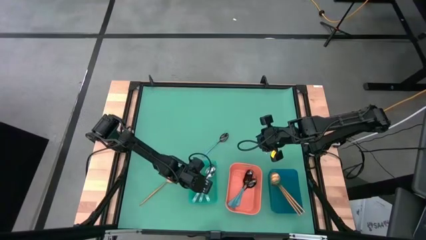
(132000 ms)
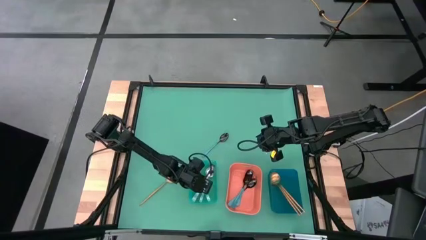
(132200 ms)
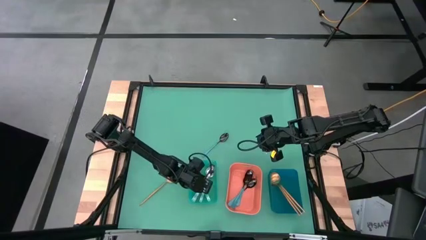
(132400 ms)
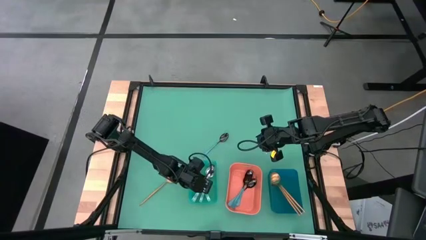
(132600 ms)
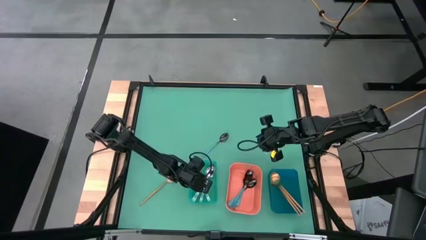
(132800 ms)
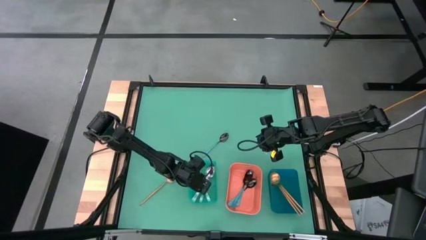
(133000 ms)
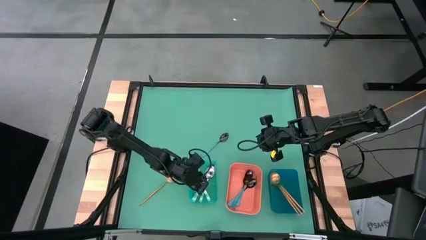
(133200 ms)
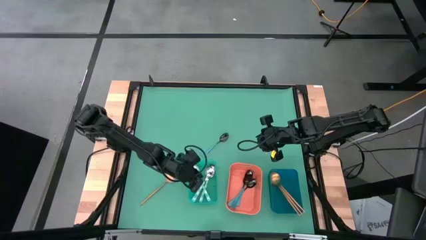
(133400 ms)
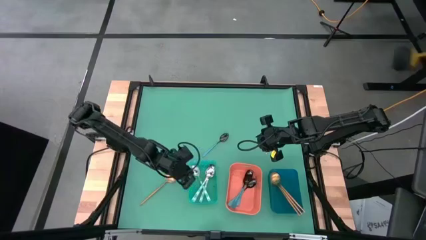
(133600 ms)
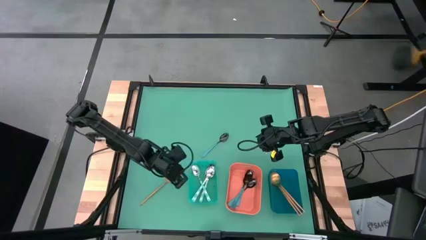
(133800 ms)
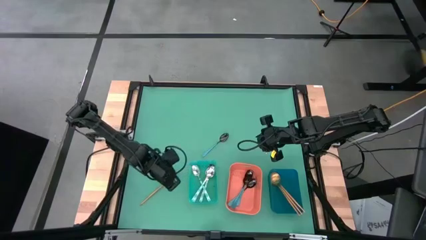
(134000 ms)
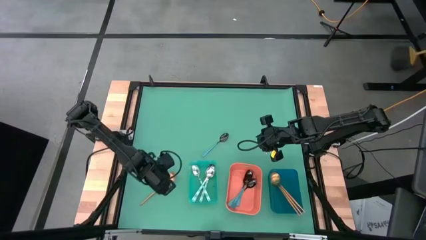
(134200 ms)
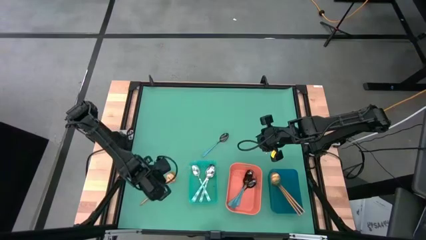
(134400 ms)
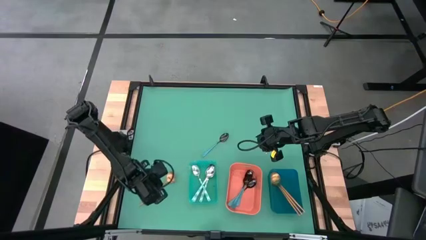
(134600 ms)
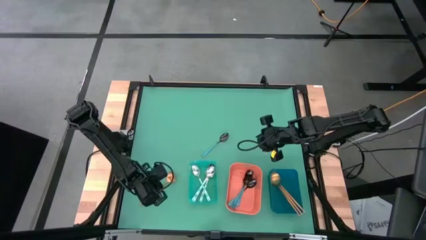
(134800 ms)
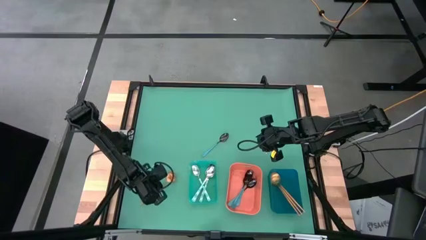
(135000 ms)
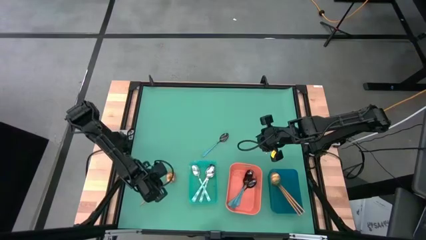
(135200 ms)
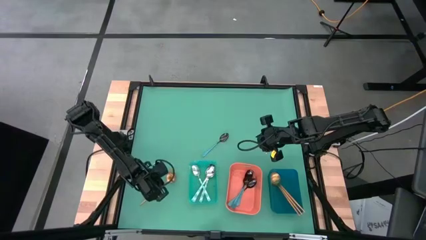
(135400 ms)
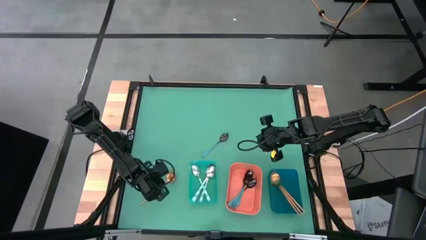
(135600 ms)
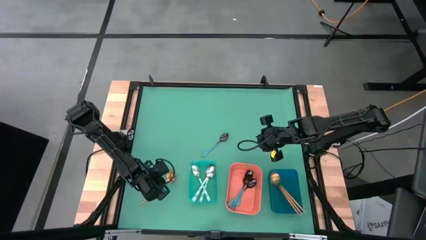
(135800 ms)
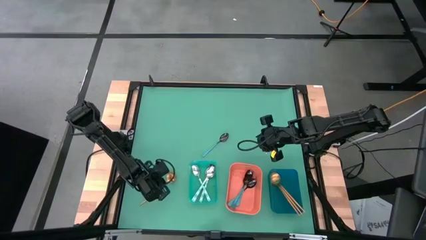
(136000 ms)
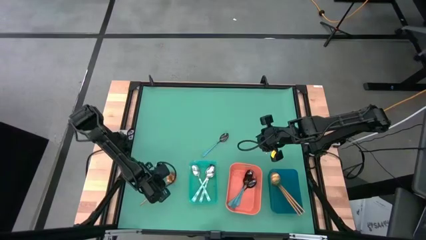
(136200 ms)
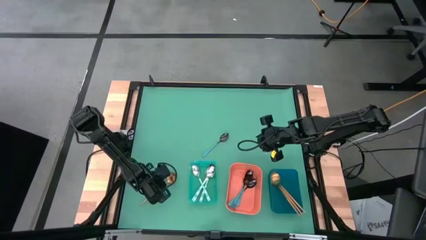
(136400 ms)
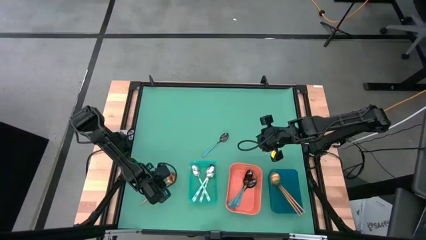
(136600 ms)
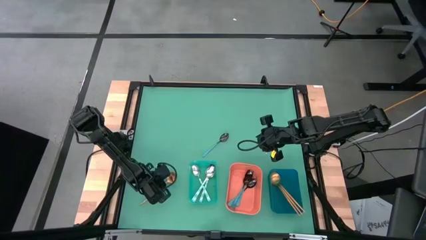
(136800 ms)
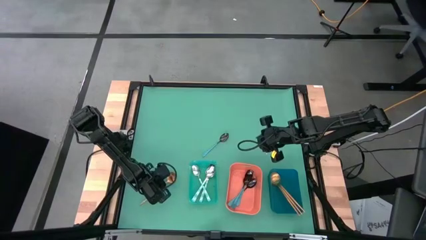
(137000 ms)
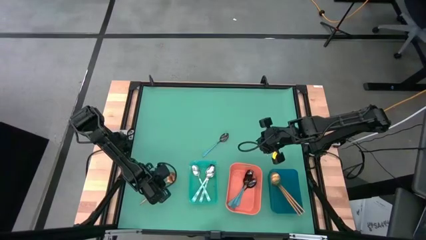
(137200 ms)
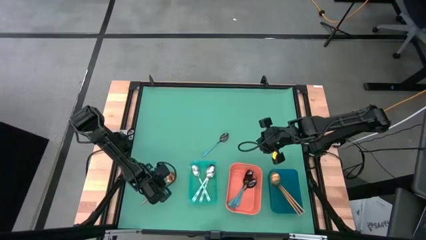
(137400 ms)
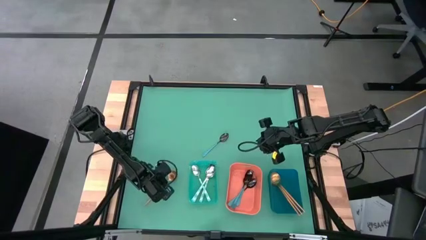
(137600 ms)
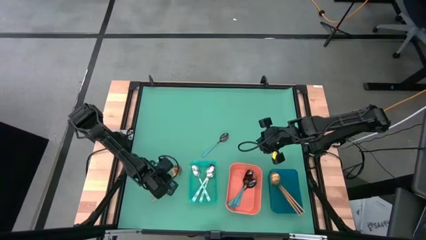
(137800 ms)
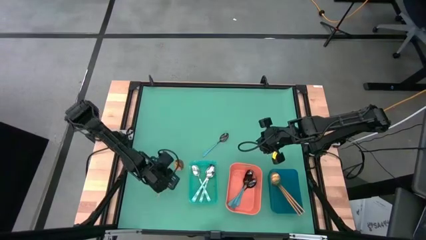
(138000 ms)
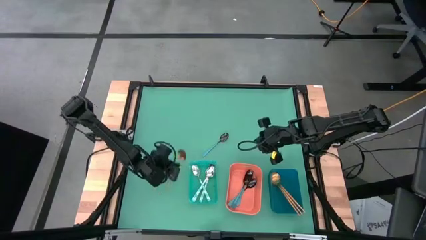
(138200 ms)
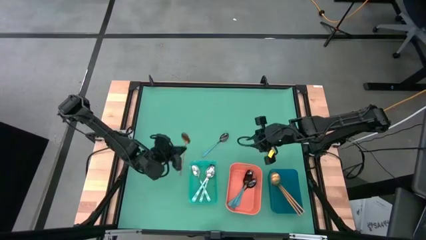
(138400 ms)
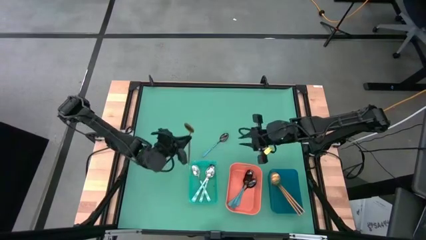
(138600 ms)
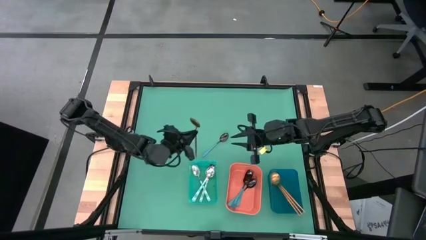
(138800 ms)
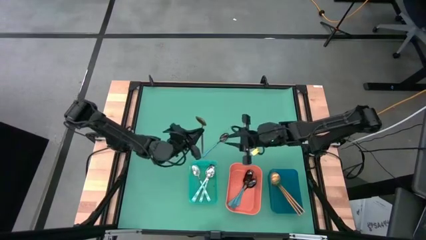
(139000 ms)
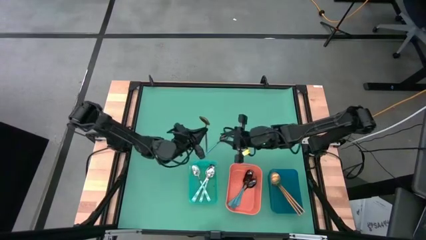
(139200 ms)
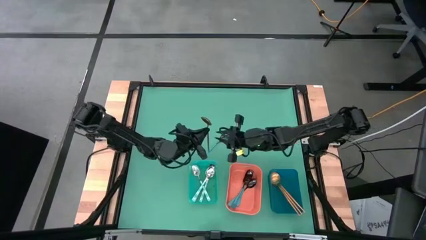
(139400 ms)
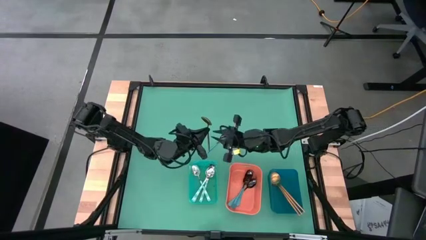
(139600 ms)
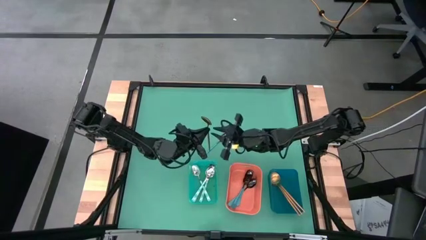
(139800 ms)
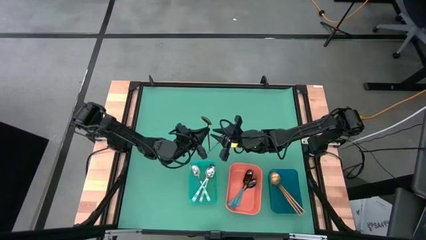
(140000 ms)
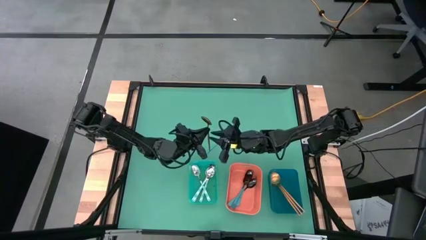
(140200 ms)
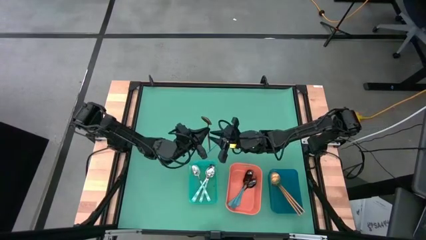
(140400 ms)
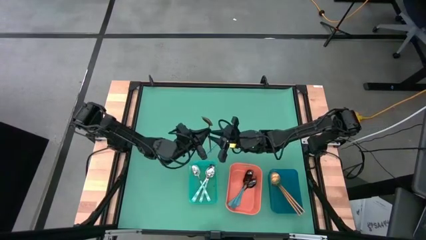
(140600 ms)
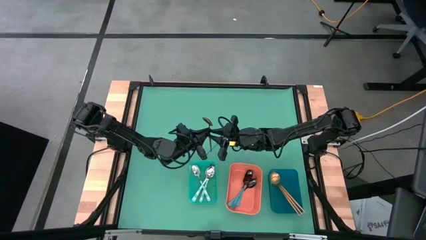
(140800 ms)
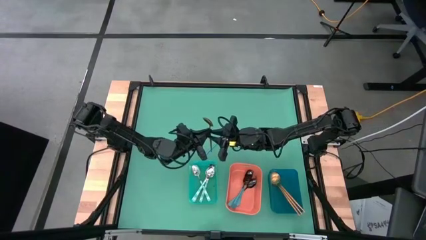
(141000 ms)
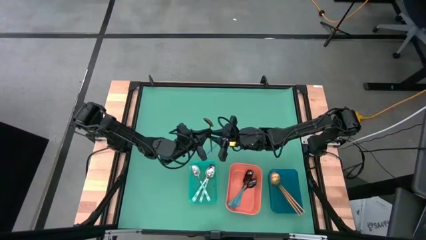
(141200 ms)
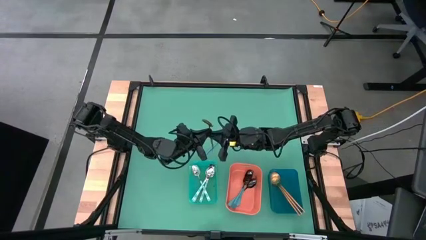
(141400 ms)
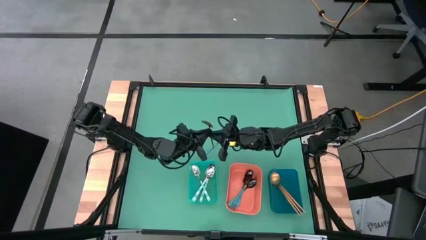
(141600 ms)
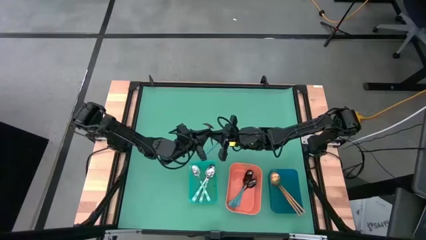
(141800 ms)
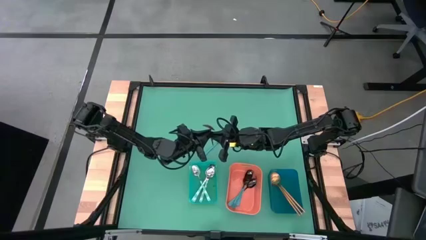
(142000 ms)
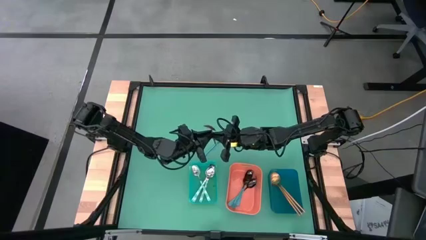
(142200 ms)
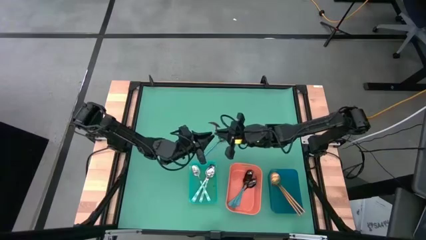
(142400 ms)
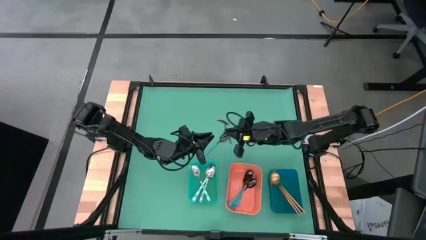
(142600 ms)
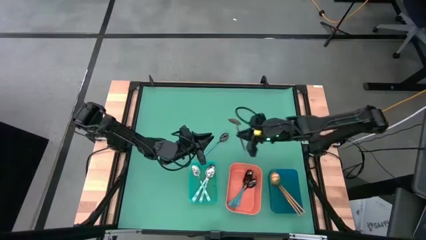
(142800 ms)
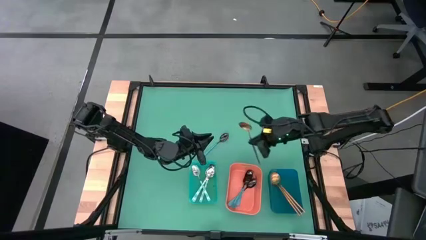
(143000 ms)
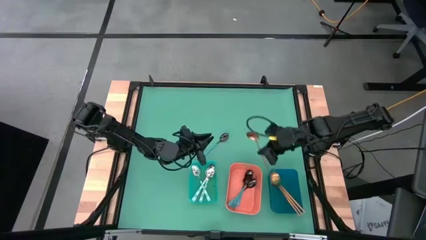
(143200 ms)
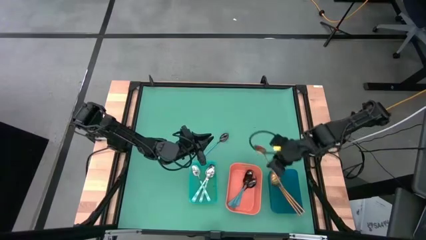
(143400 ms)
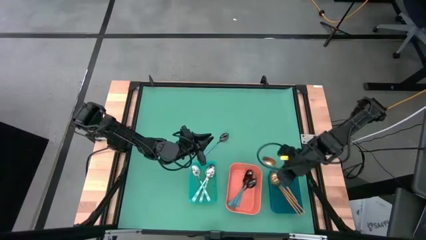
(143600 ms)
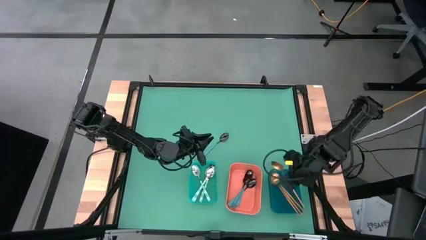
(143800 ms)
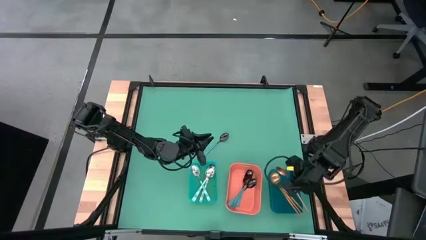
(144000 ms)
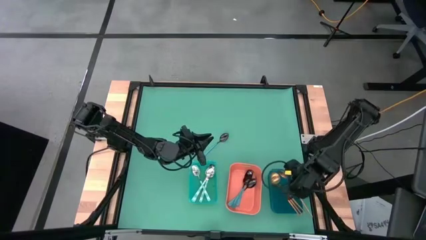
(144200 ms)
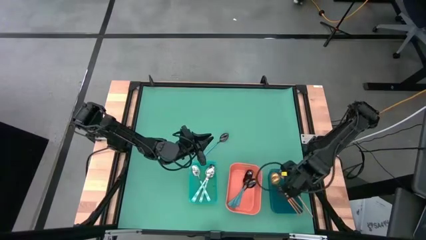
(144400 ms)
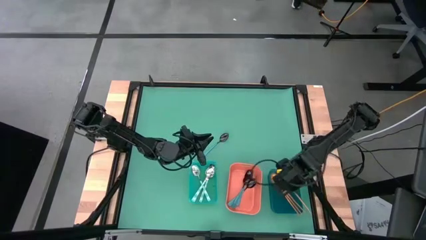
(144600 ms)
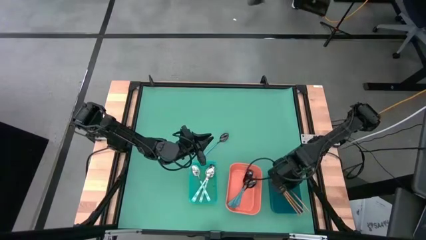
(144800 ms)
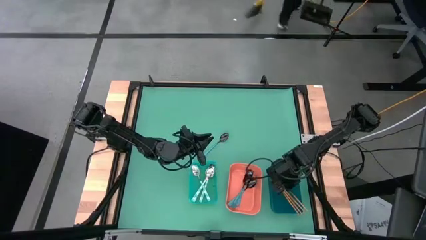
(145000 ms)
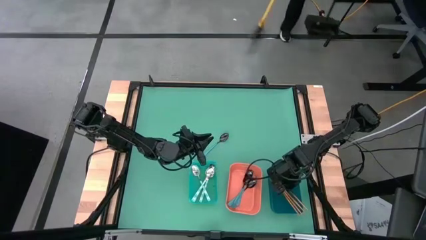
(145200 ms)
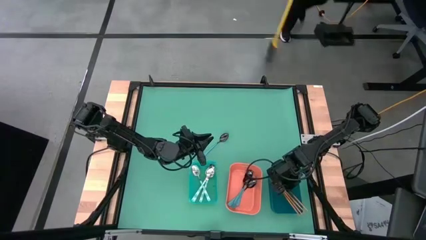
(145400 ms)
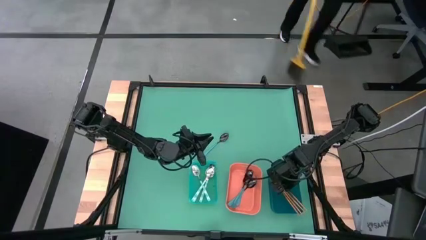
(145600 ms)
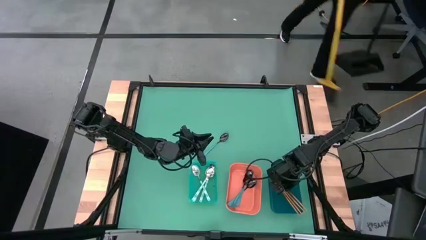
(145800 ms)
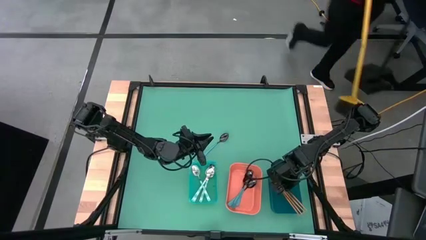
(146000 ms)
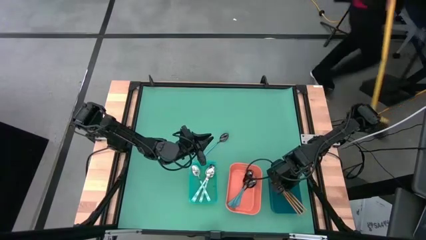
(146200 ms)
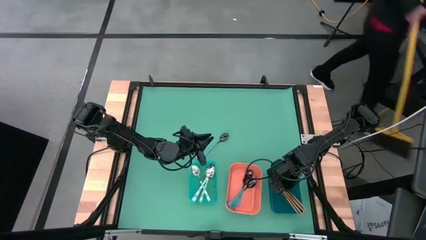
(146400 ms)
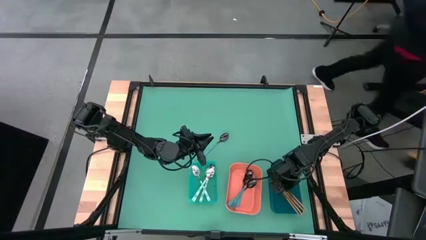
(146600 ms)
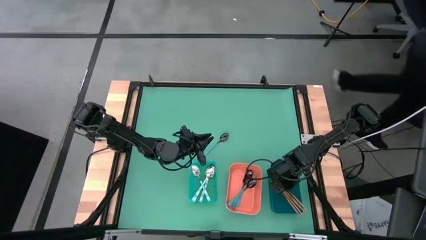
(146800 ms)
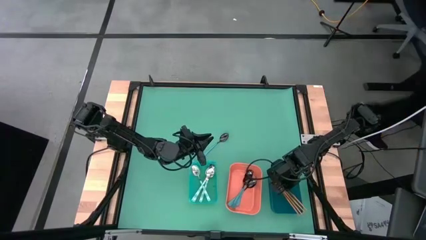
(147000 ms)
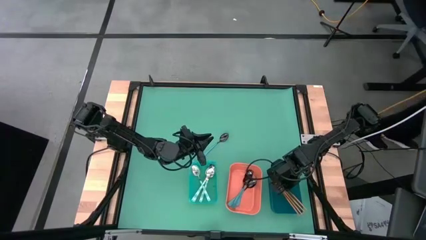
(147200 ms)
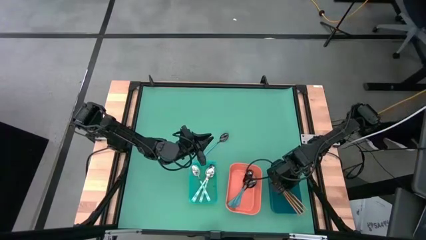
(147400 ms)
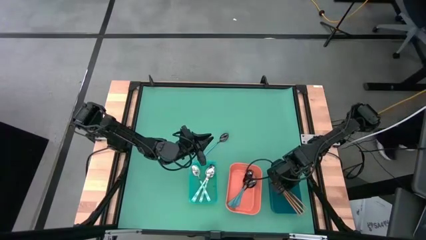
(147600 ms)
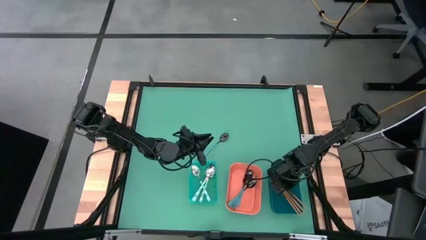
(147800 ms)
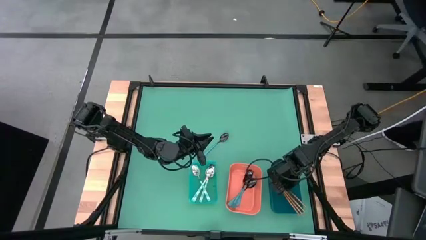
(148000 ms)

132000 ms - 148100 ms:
Task: Sort silverware by color (type)
Put the golden spoon into the blue bin
